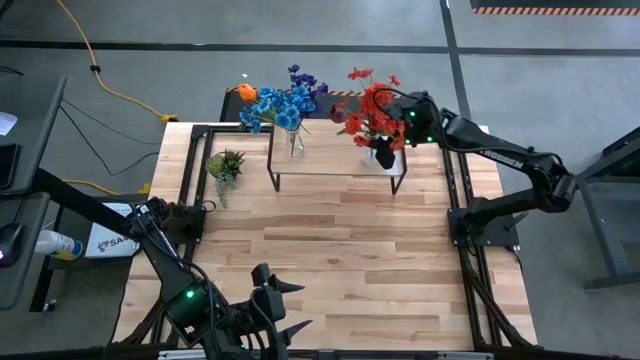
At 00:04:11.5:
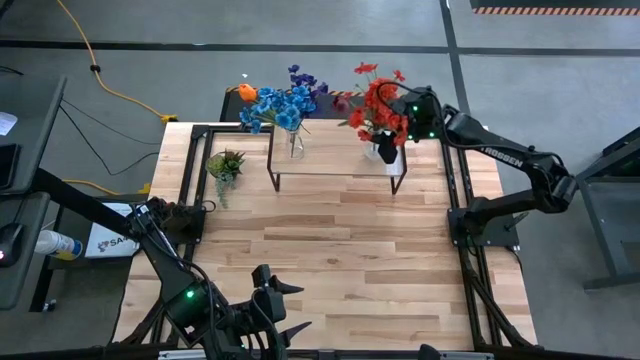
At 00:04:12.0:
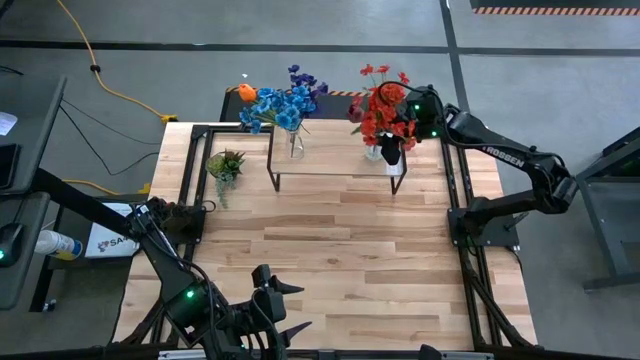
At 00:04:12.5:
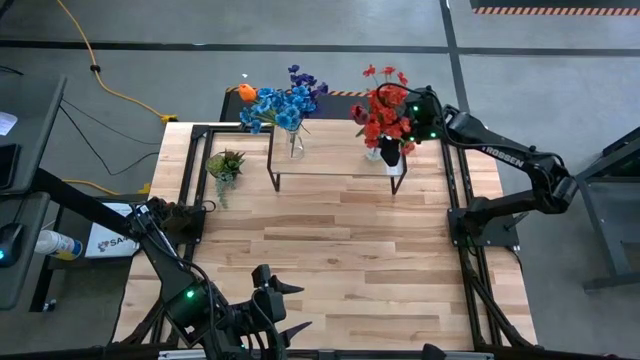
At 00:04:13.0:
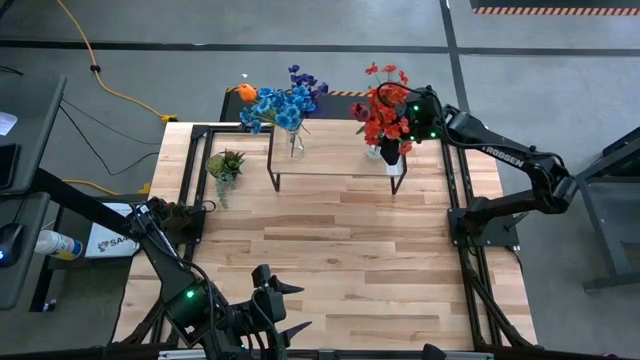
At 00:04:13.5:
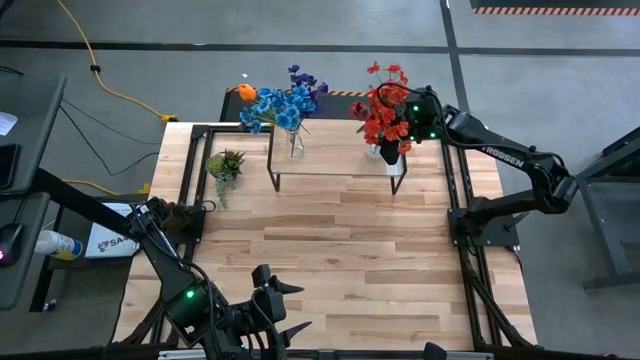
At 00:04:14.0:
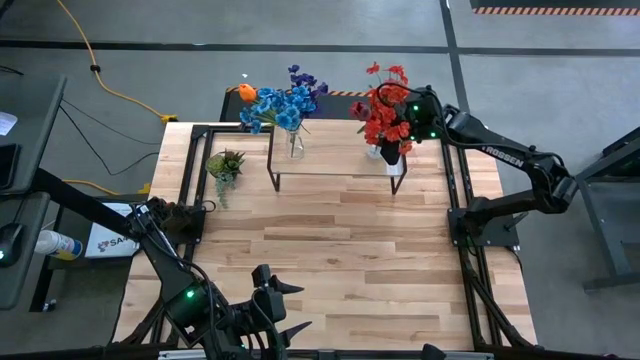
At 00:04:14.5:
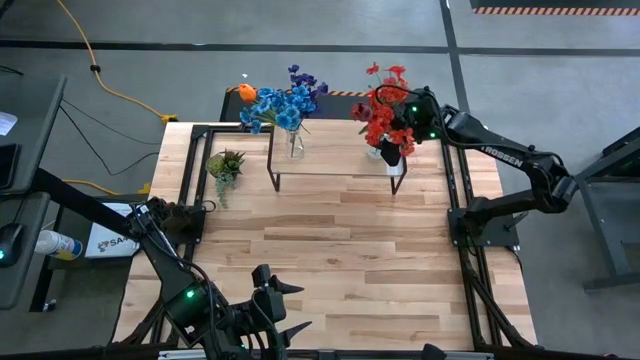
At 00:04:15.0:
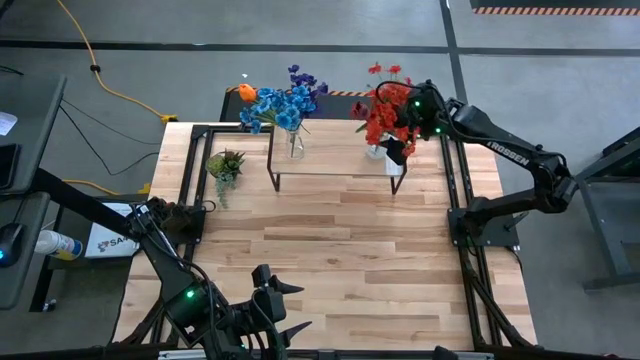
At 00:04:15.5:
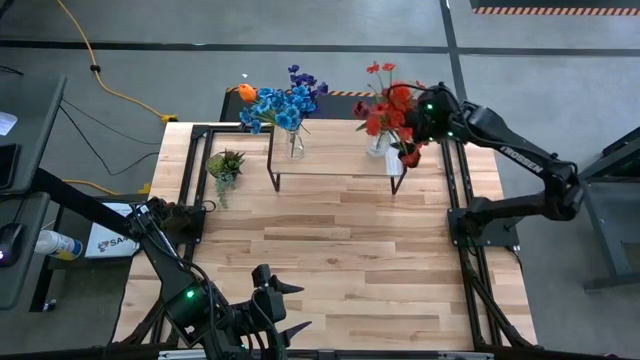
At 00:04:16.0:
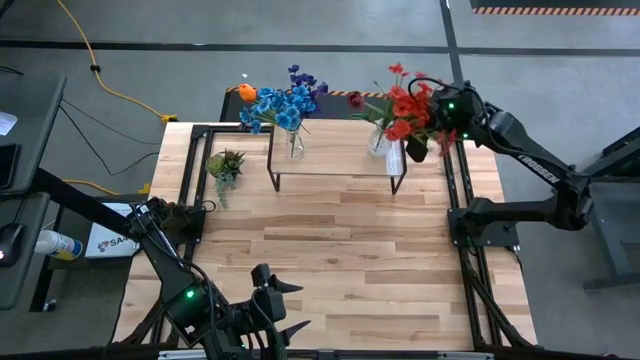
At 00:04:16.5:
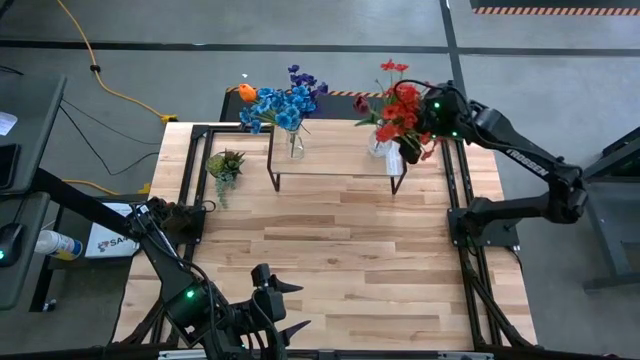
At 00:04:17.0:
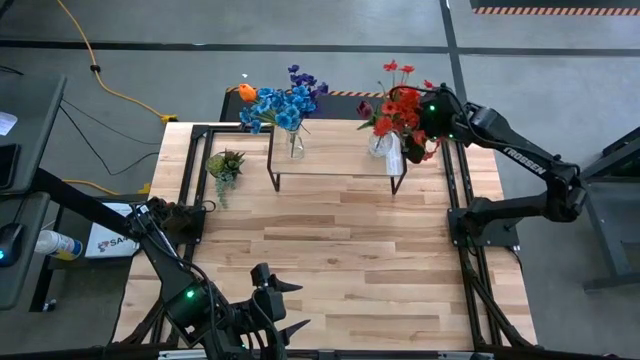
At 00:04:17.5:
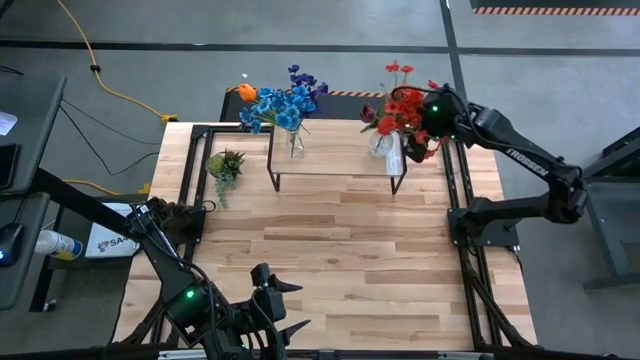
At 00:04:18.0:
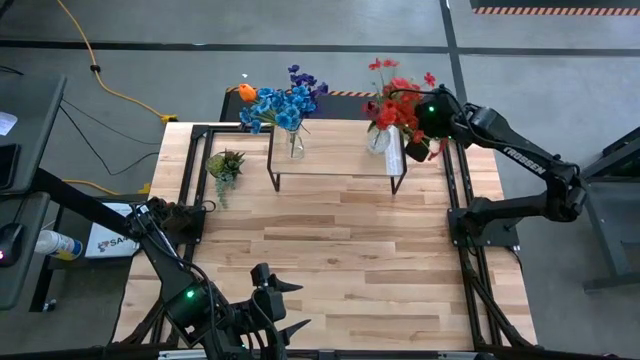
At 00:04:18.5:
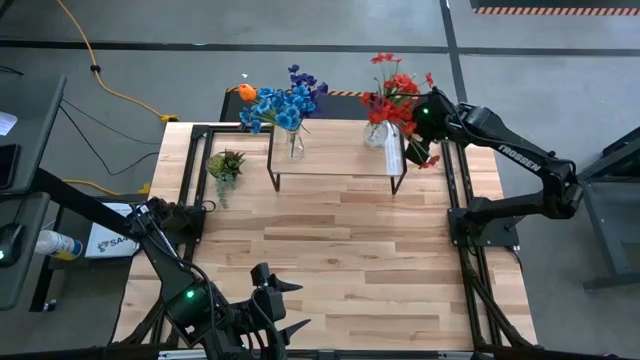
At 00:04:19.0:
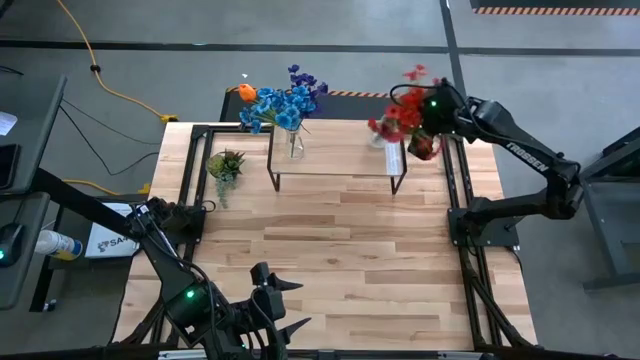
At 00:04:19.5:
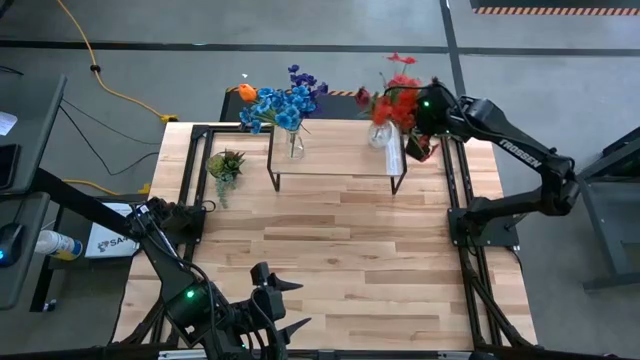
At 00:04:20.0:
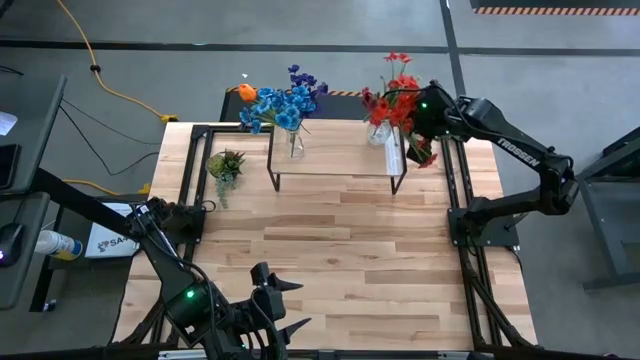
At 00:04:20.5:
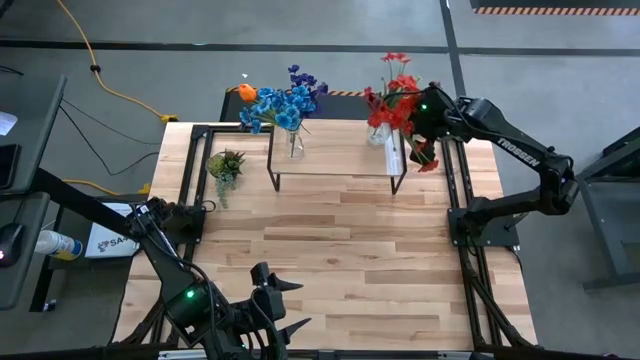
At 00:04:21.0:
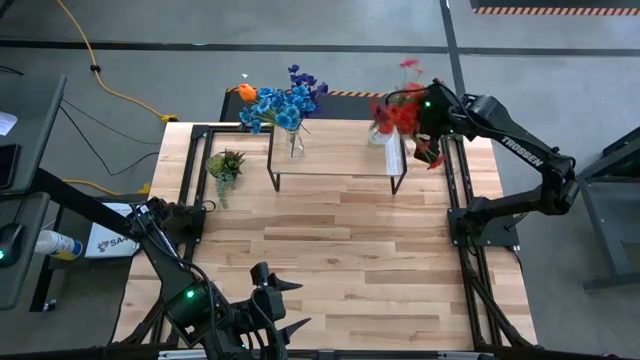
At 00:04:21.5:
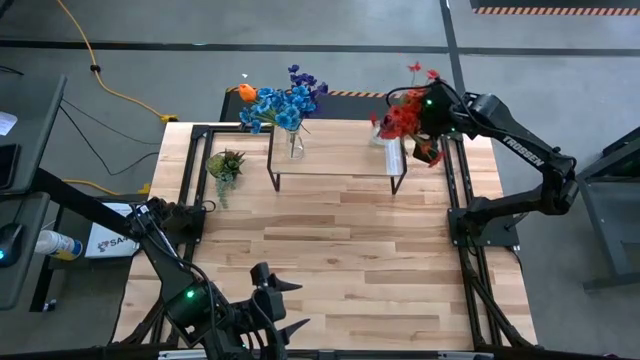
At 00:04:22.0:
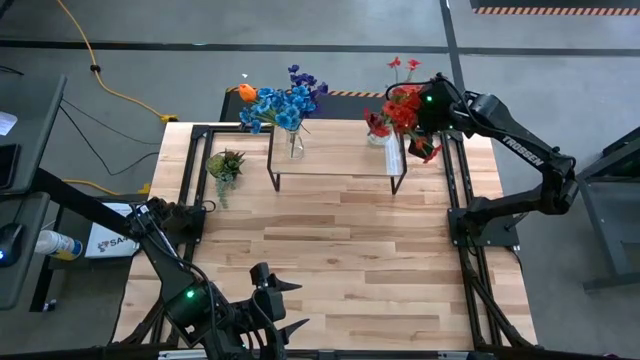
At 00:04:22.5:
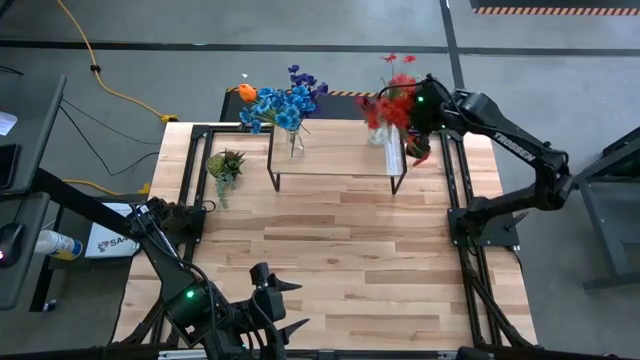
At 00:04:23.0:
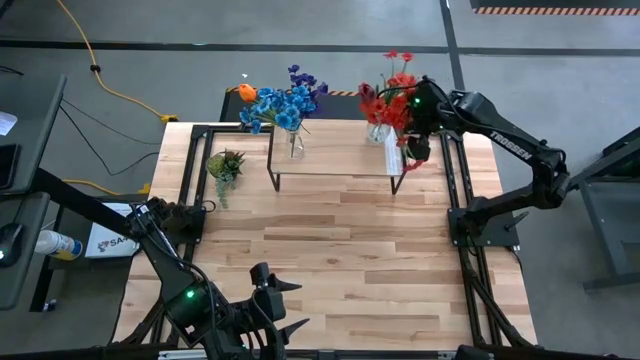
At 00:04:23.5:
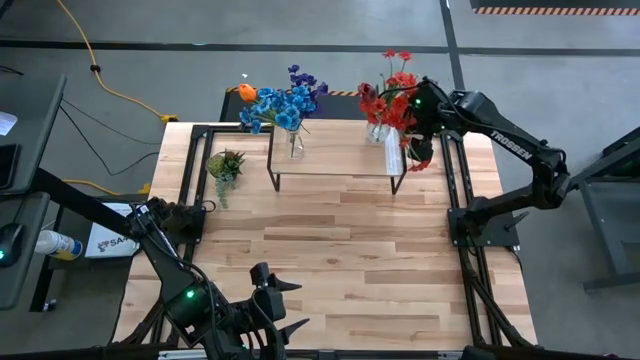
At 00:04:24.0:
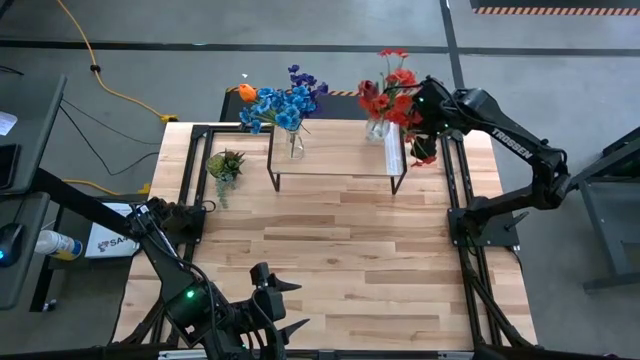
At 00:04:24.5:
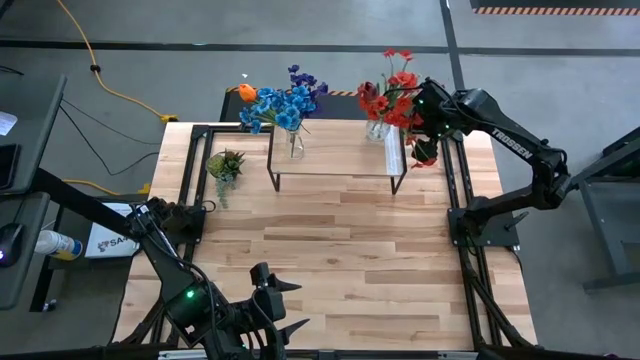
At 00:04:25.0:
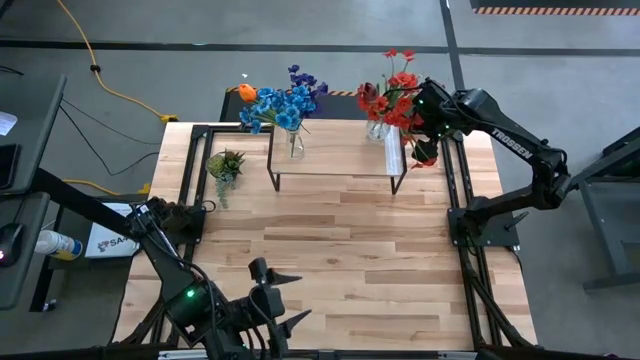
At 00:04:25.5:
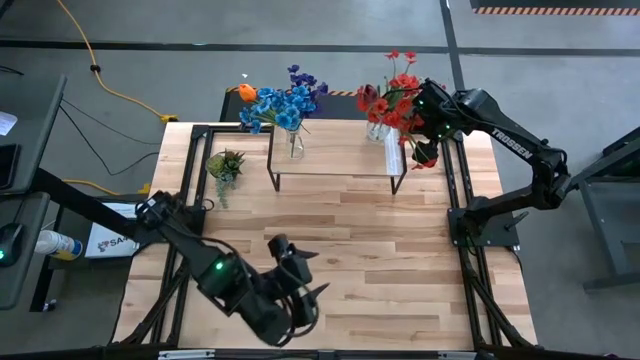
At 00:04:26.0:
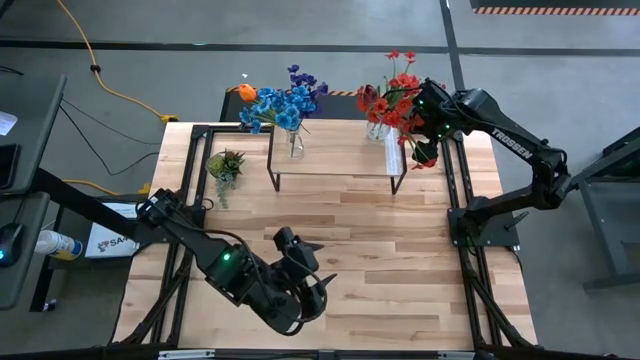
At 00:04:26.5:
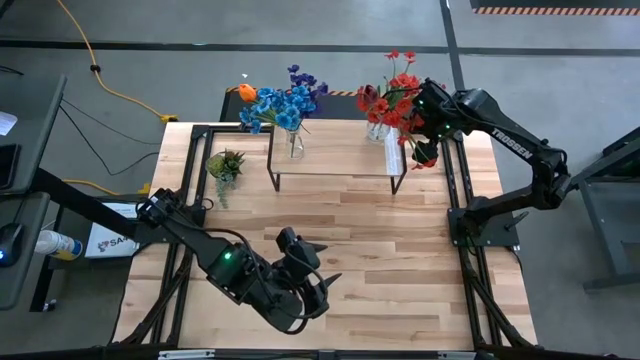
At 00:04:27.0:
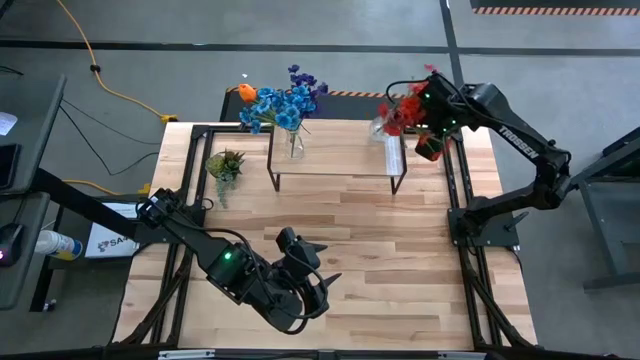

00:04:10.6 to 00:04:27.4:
Task: Pick and place flowers into a vace then onto a shelf
Put the right flowers transparent vase on the shelf

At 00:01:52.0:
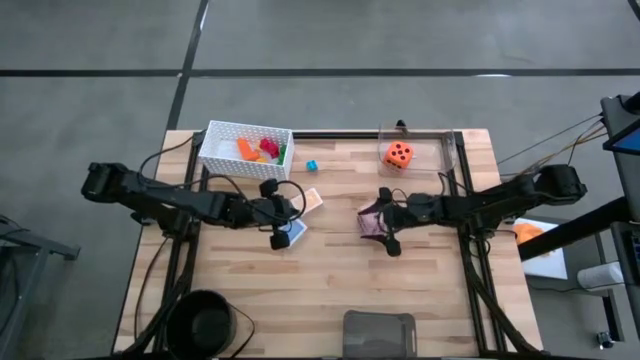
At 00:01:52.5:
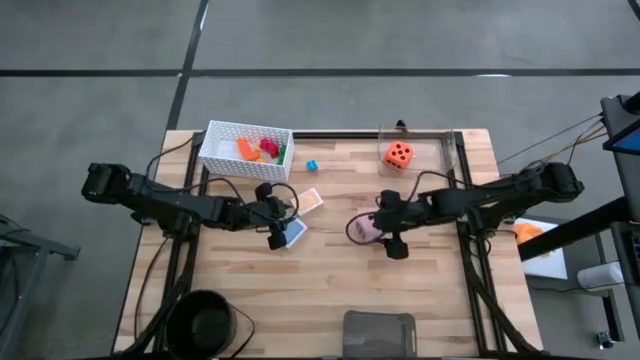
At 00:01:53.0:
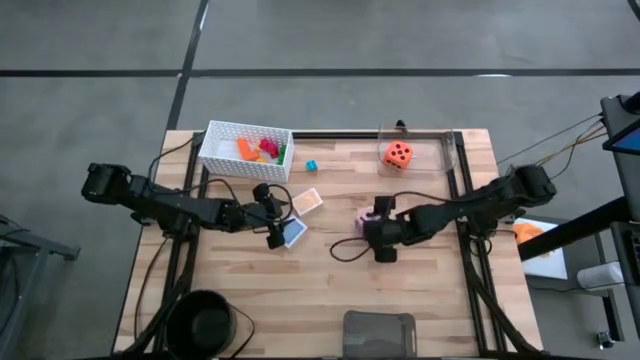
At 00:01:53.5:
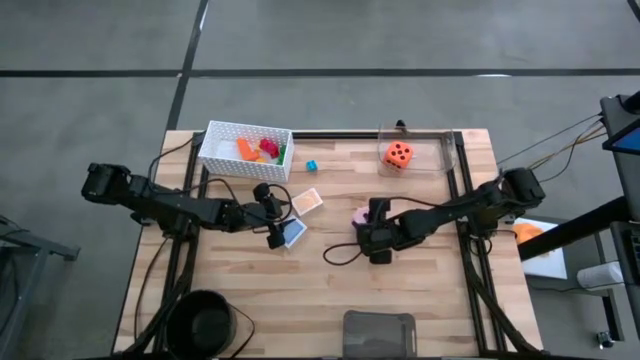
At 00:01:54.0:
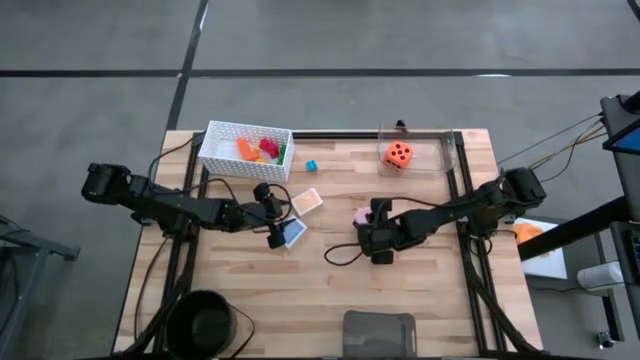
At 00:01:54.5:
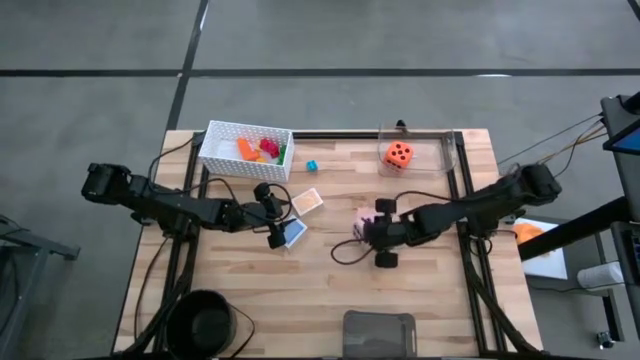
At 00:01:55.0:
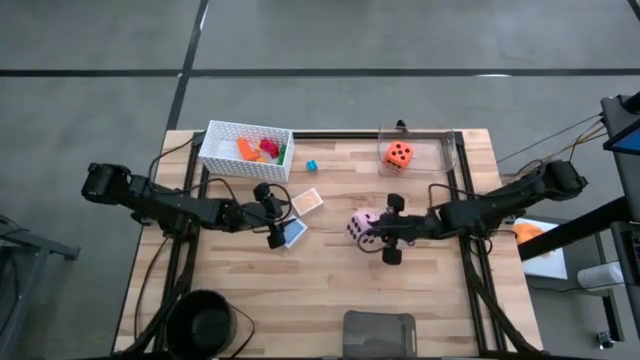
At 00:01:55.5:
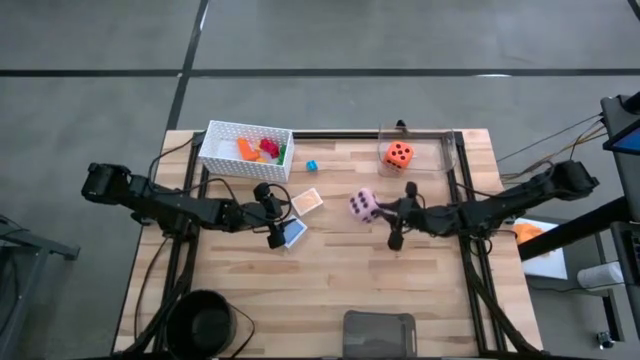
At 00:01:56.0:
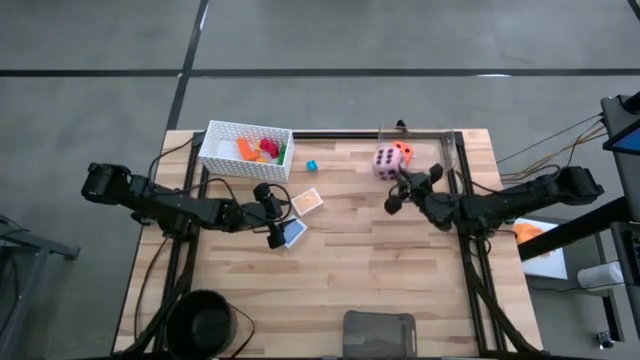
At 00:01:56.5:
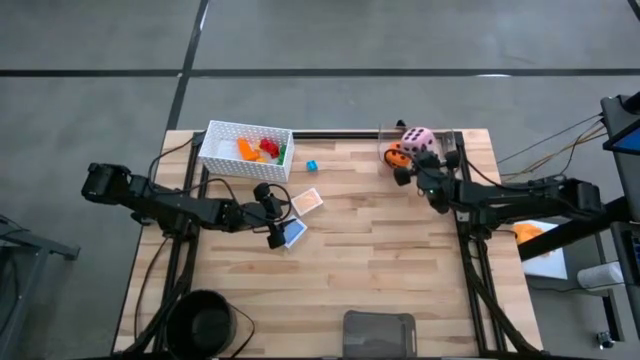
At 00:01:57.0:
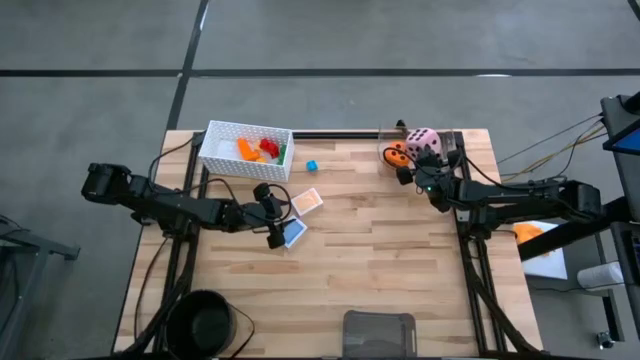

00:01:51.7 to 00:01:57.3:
Task: Pick & Place Toys
Put the pink dice into the transparent bin
